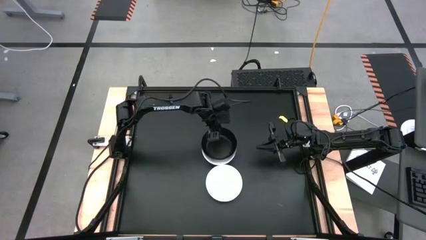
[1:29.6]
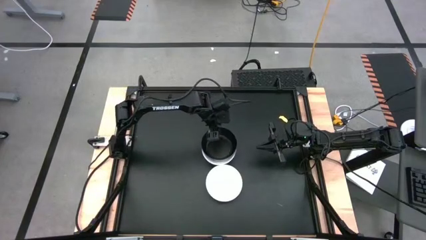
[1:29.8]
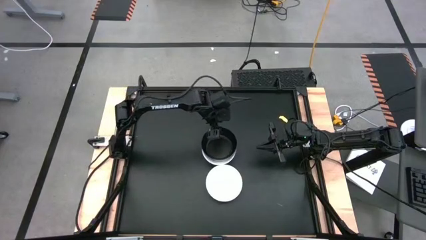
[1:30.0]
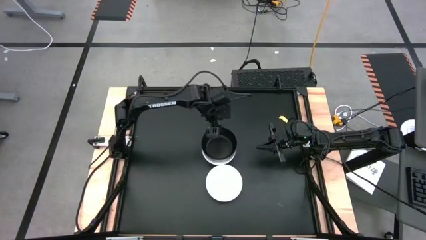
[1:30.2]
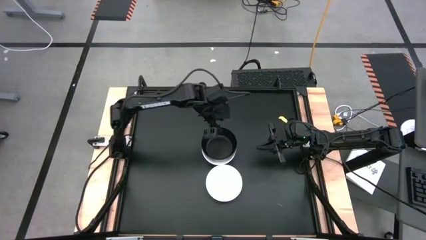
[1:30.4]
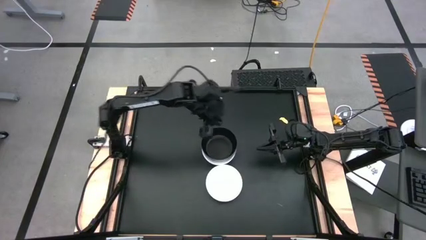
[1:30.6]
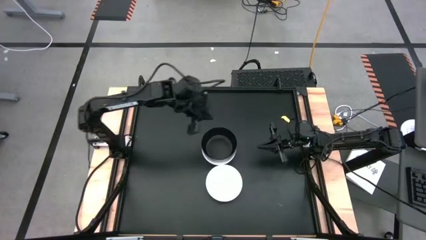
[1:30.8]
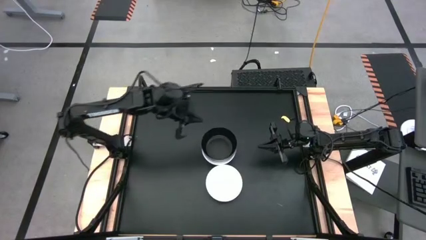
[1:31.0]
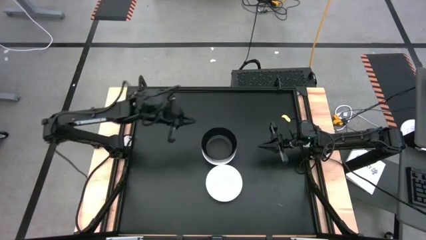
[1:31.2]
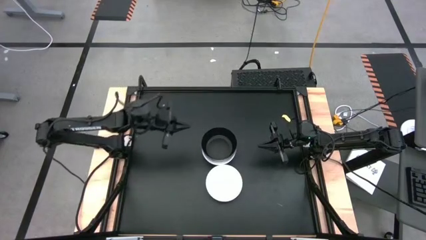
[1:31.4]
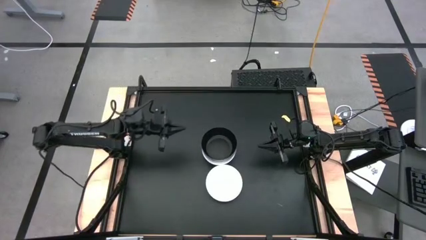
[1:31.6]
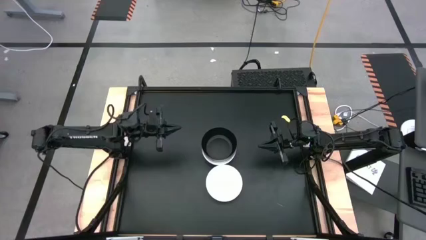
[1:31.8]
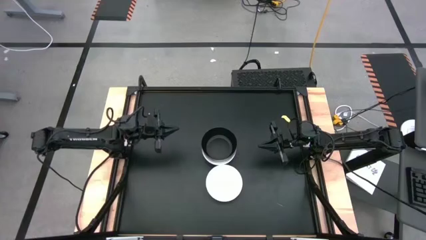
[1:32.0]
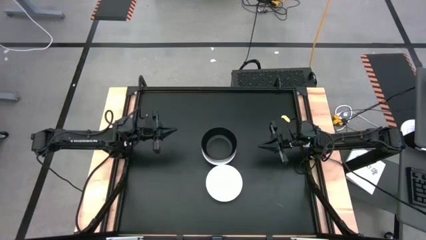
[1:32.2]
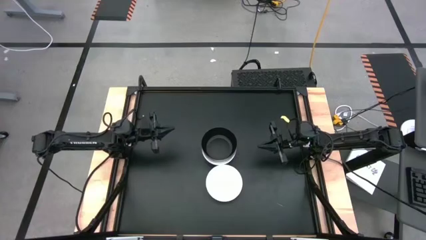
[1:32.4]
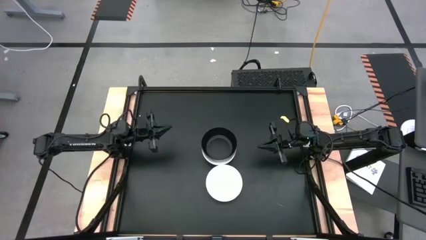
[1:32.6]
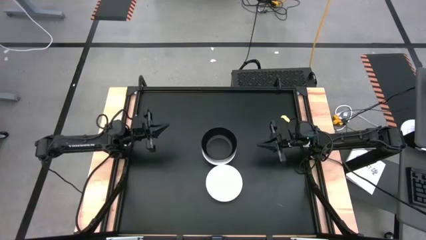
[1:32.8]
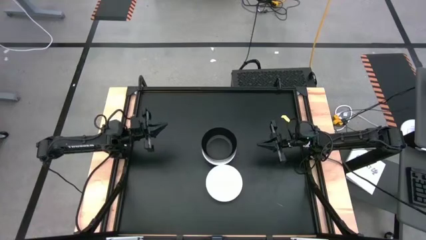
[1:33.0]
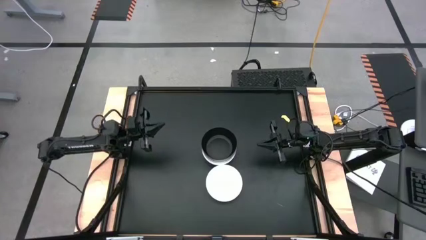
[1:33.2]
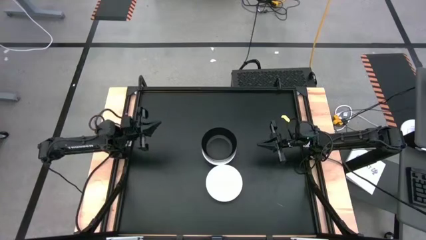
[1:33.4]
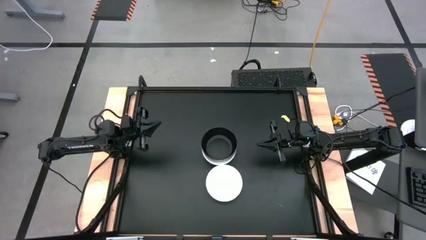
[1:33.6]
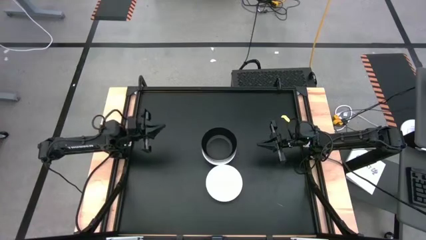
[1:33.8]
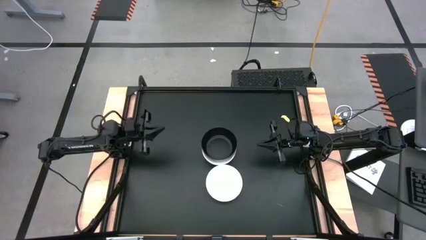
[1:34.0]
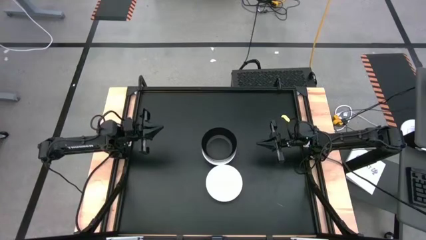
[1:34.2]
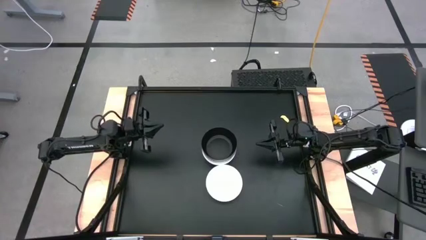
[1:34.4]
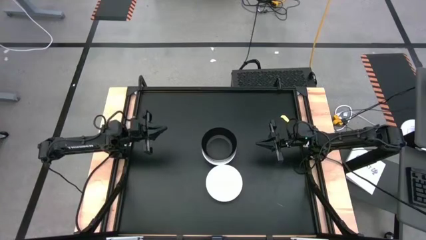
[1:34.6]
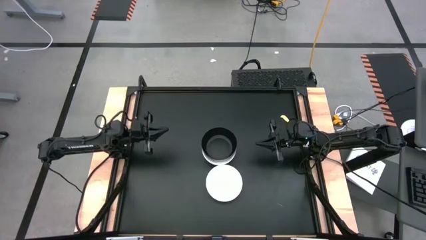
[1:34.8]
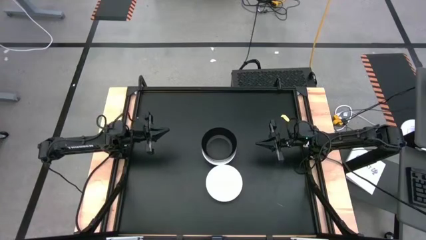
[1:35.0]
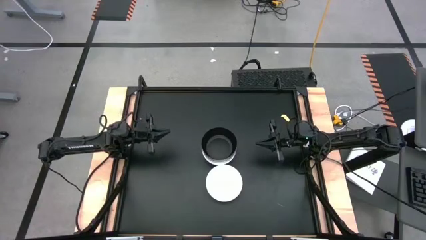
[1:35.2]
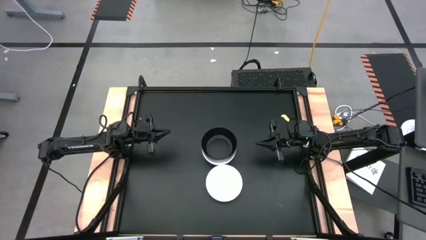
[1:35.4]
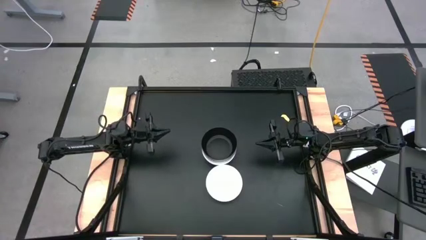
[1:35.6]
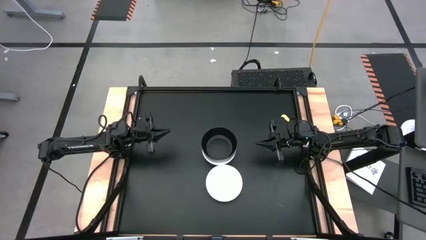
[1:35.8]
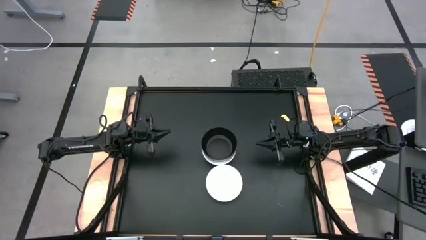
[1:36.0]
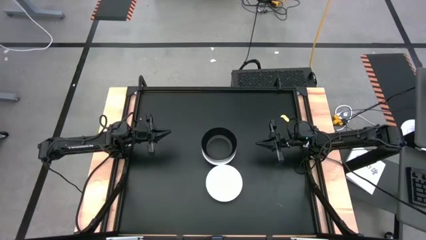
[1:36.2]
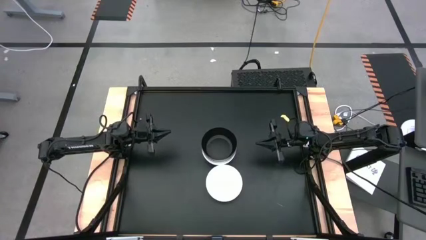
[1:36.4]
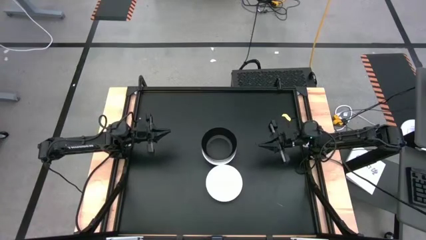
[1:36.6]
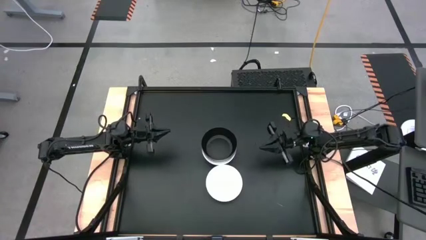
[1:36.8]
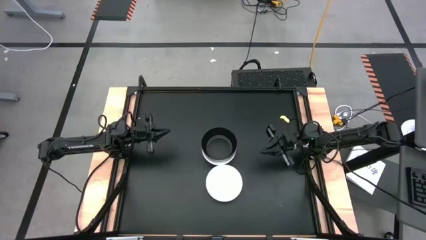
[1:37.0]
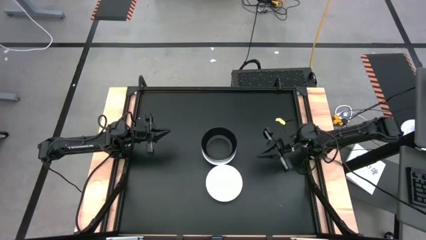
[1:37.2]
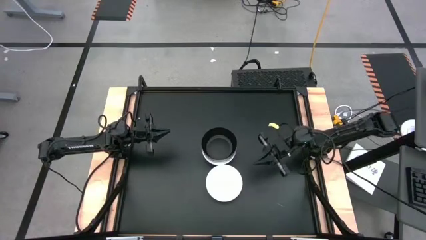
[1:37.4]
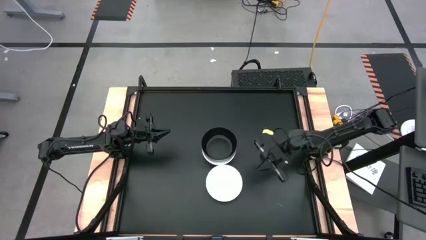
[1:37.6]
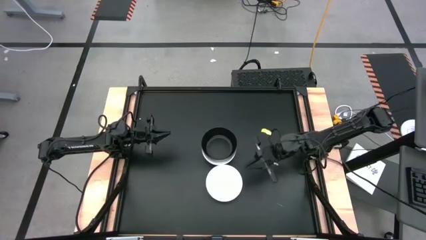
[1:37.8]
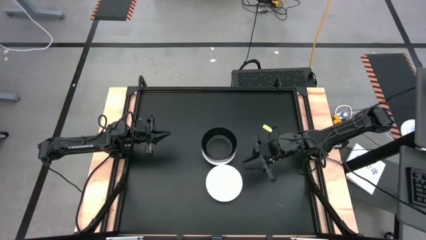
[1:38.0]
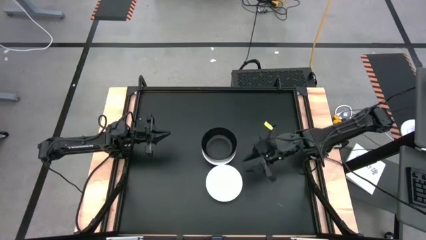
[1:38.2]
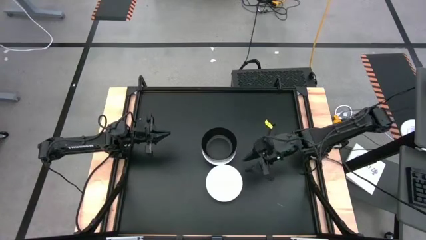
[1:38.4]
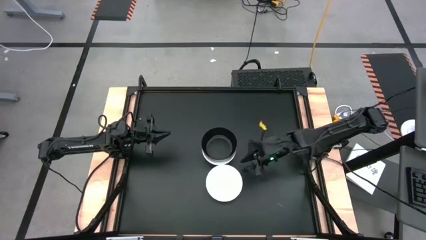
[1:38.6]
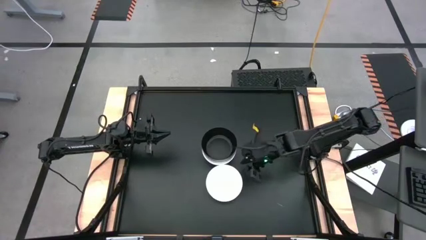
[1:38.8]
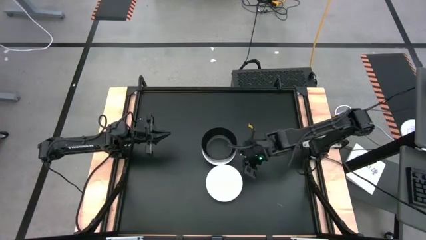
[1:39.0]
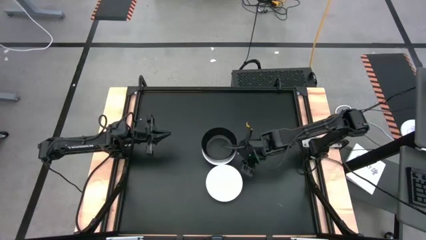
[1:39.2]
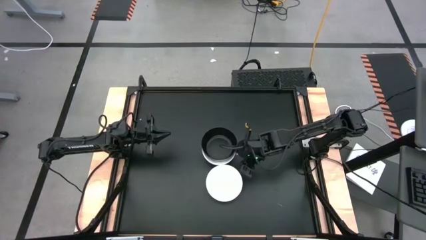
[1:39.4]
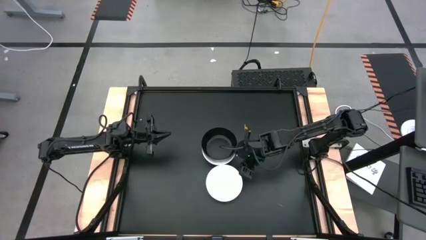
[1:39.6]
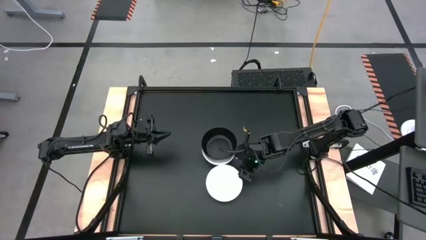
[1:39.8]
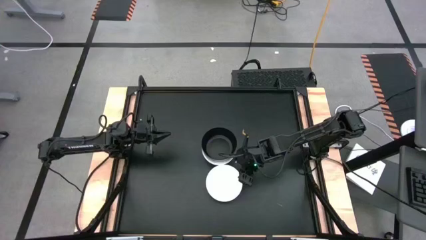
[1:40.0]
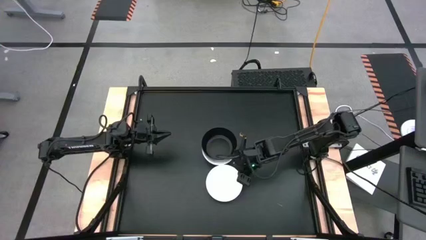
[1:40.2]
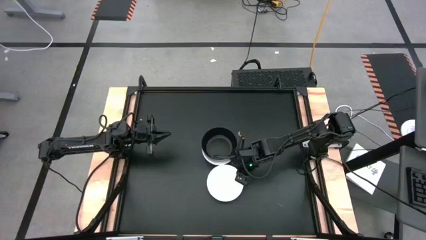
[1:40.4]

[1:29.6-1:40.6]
Task: Nest bowls inside each other
Stack the white bowl on top of the black bowl
